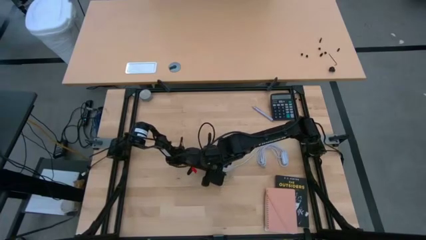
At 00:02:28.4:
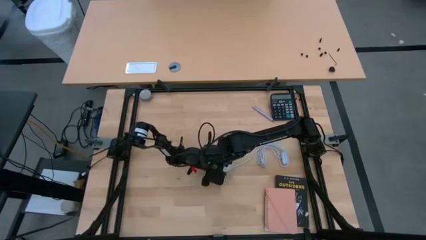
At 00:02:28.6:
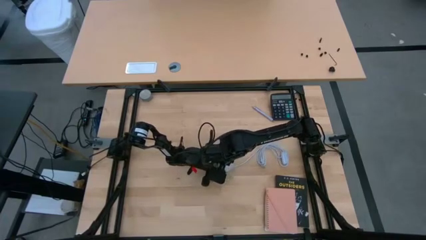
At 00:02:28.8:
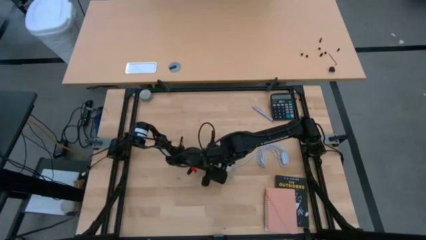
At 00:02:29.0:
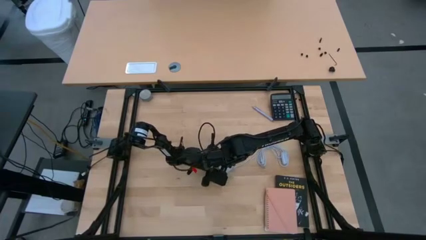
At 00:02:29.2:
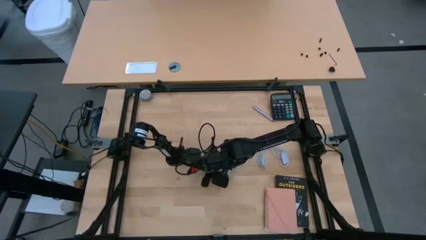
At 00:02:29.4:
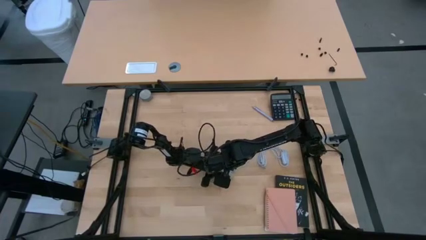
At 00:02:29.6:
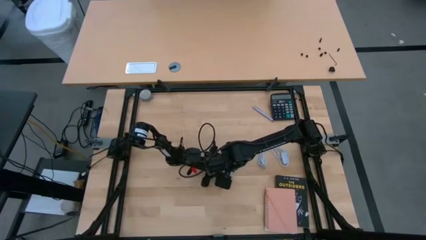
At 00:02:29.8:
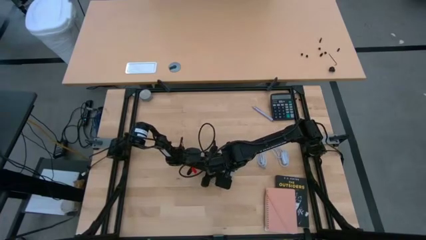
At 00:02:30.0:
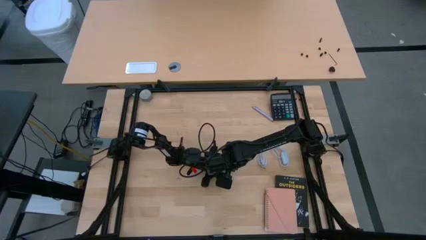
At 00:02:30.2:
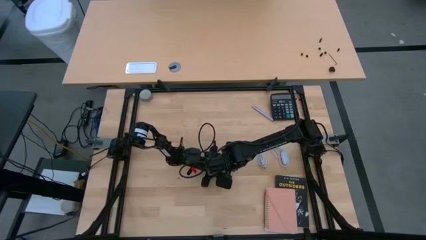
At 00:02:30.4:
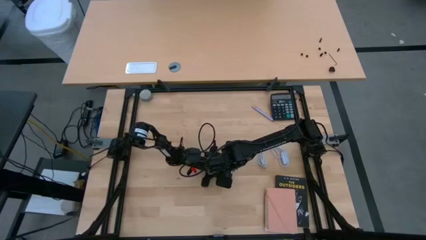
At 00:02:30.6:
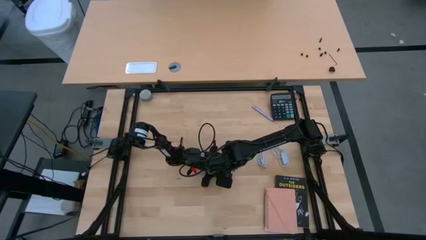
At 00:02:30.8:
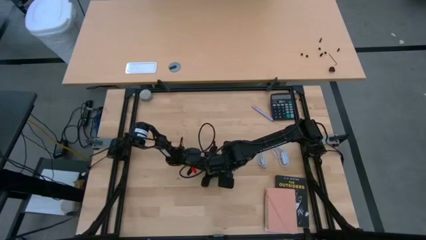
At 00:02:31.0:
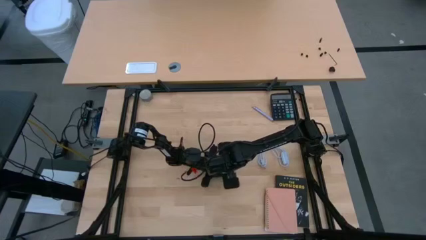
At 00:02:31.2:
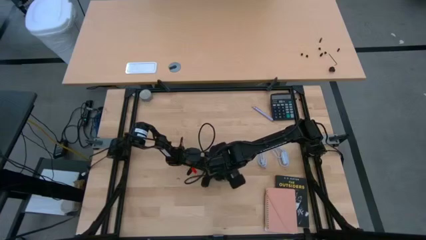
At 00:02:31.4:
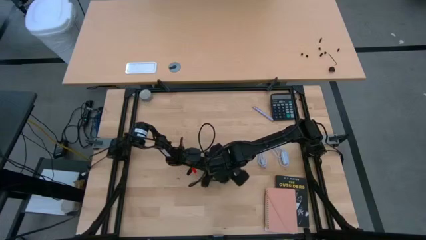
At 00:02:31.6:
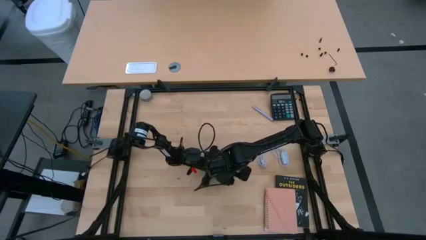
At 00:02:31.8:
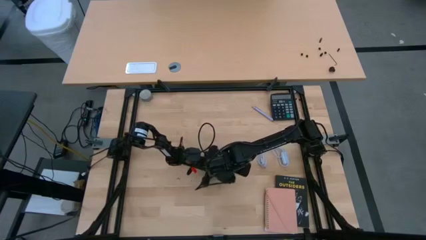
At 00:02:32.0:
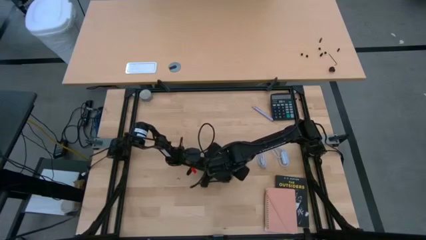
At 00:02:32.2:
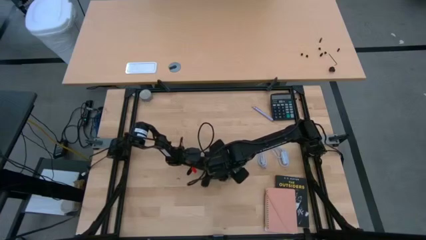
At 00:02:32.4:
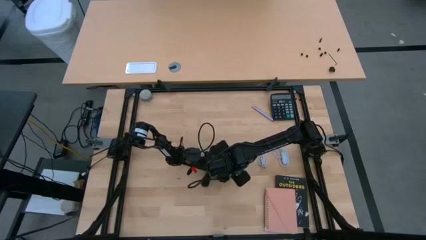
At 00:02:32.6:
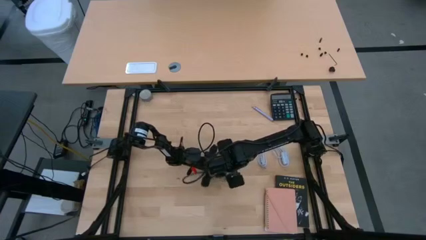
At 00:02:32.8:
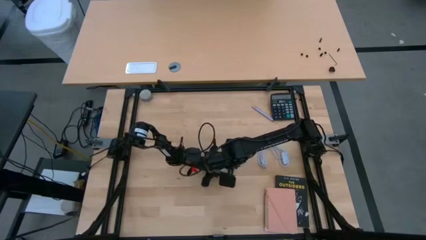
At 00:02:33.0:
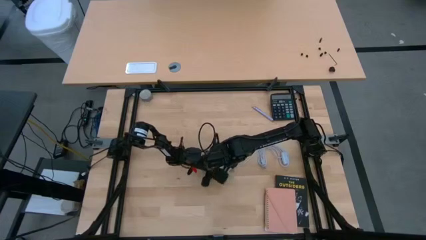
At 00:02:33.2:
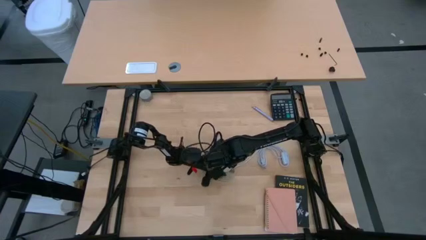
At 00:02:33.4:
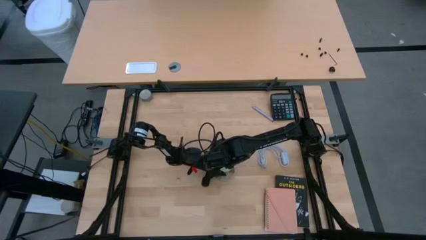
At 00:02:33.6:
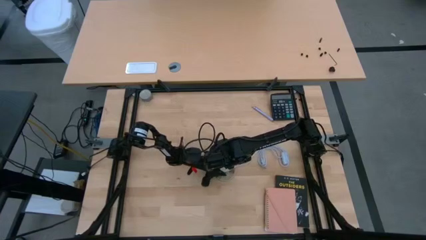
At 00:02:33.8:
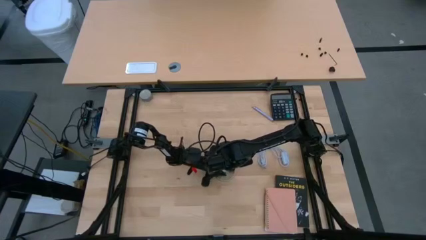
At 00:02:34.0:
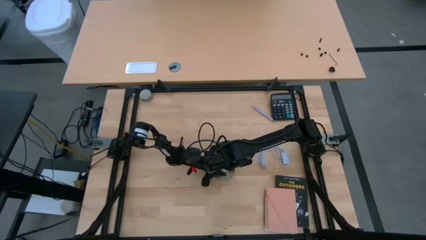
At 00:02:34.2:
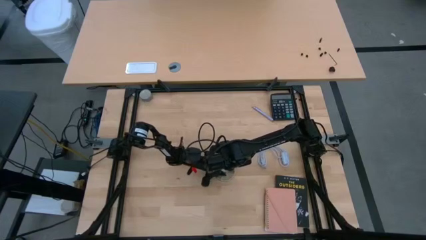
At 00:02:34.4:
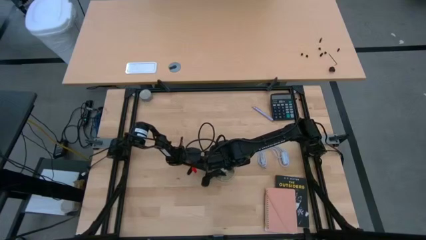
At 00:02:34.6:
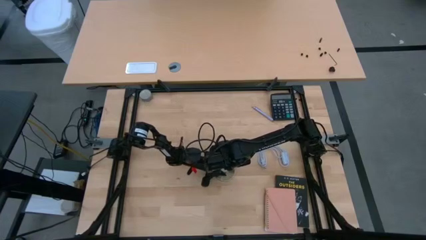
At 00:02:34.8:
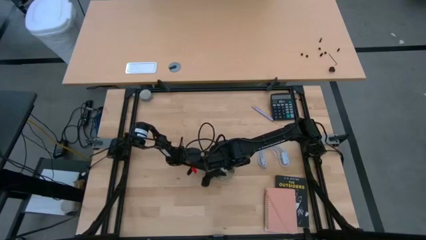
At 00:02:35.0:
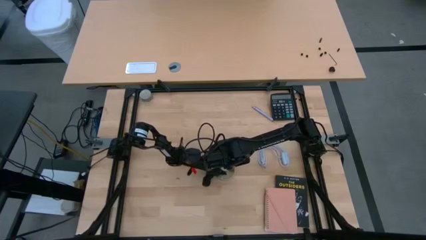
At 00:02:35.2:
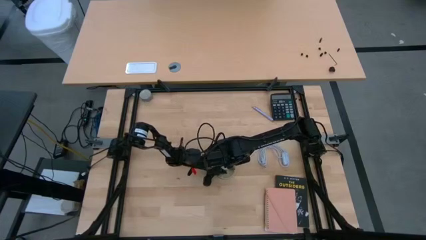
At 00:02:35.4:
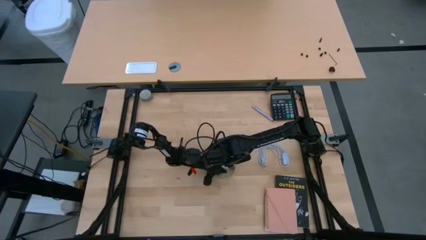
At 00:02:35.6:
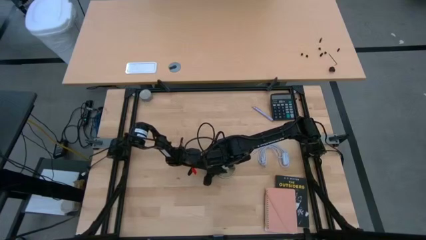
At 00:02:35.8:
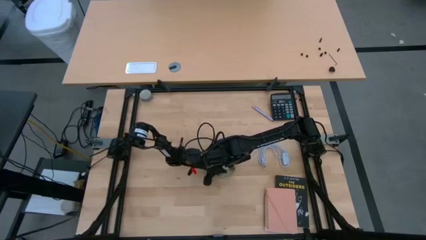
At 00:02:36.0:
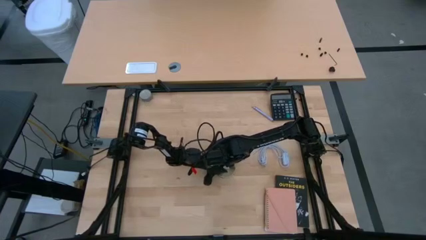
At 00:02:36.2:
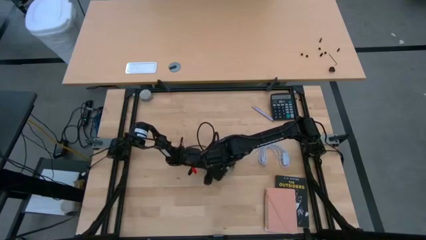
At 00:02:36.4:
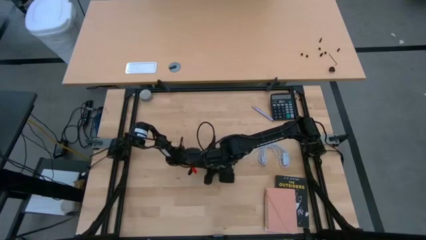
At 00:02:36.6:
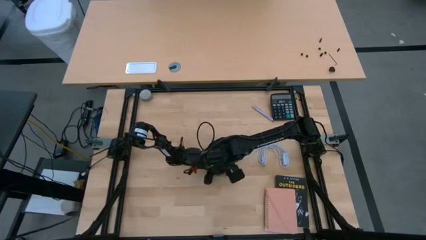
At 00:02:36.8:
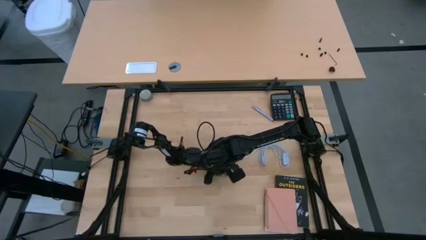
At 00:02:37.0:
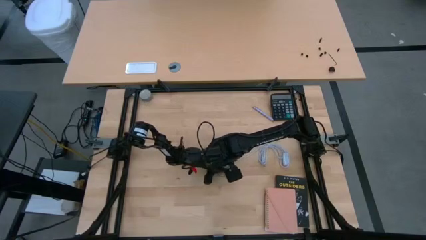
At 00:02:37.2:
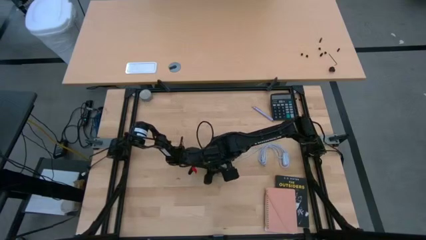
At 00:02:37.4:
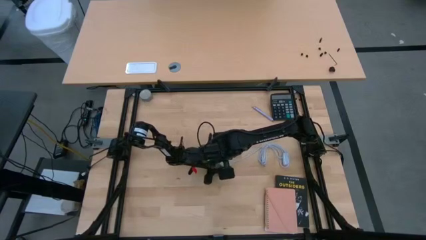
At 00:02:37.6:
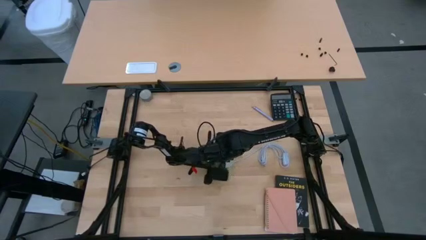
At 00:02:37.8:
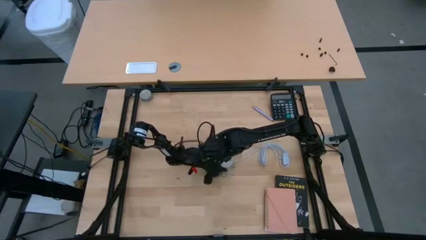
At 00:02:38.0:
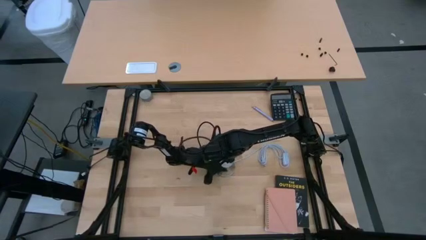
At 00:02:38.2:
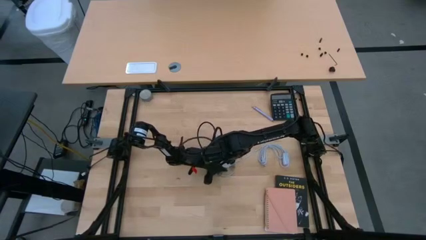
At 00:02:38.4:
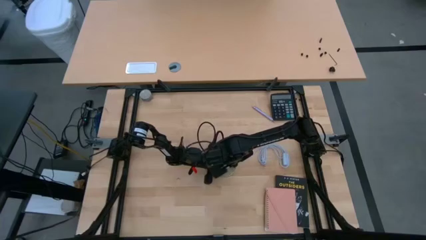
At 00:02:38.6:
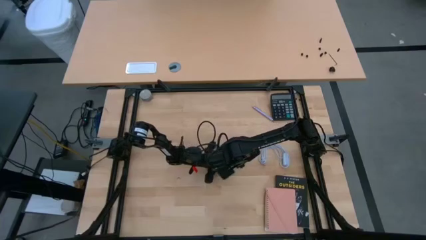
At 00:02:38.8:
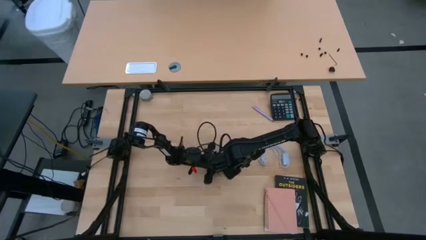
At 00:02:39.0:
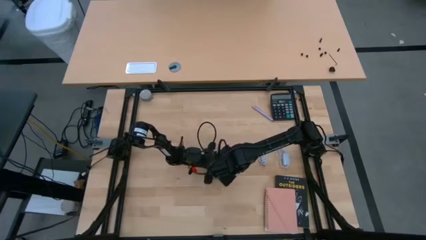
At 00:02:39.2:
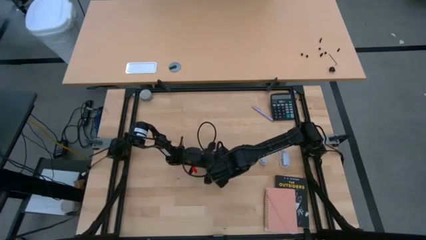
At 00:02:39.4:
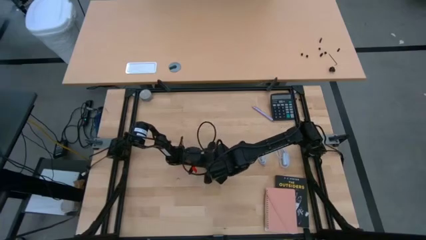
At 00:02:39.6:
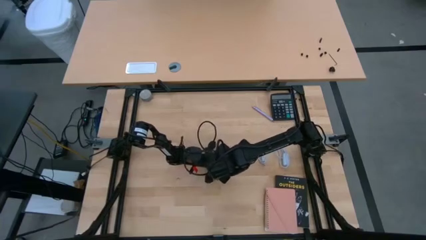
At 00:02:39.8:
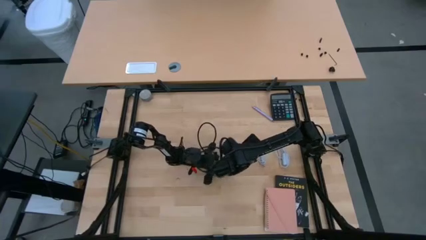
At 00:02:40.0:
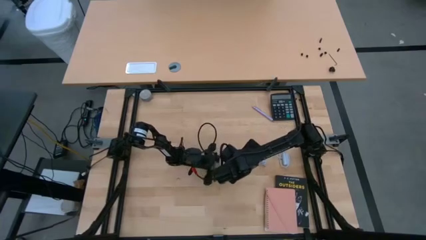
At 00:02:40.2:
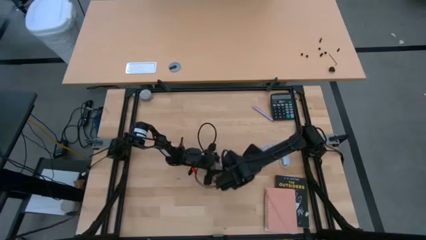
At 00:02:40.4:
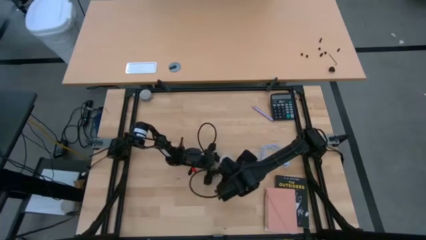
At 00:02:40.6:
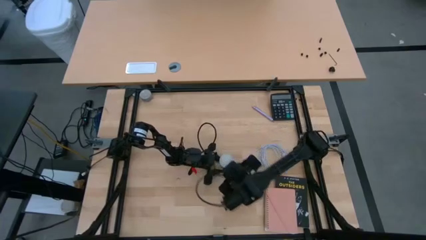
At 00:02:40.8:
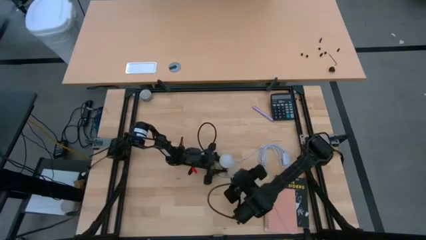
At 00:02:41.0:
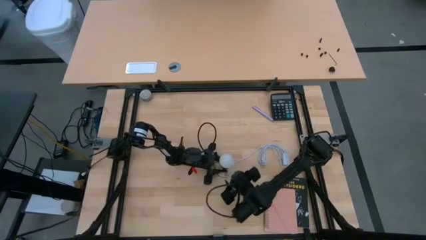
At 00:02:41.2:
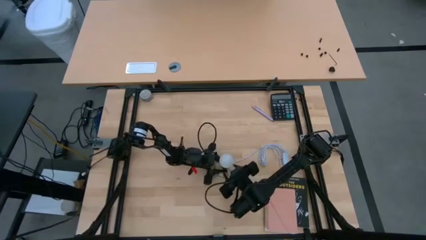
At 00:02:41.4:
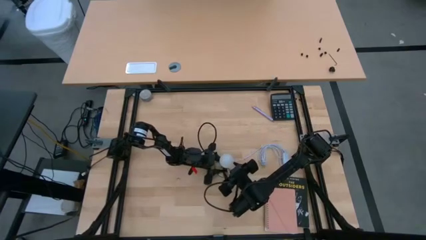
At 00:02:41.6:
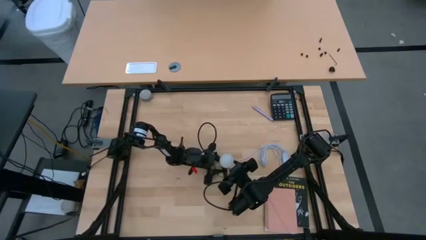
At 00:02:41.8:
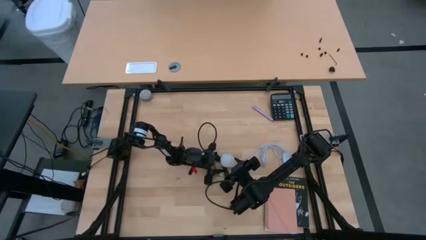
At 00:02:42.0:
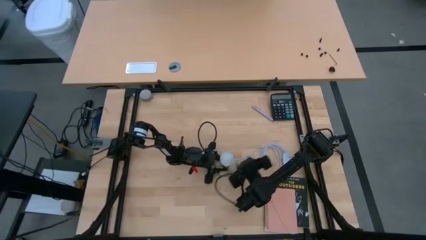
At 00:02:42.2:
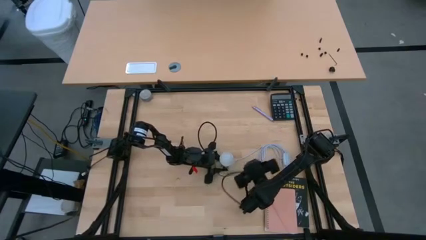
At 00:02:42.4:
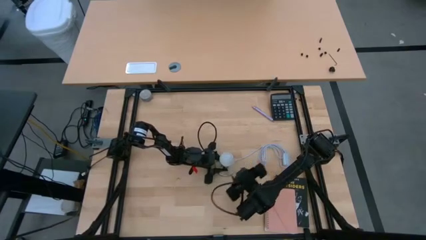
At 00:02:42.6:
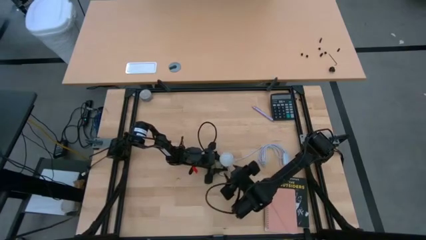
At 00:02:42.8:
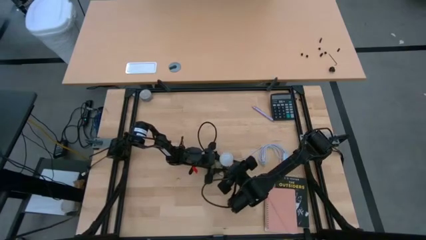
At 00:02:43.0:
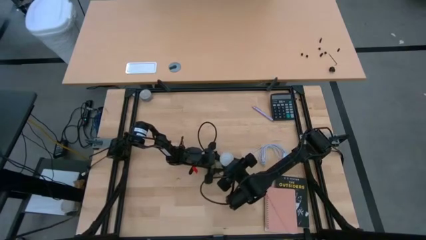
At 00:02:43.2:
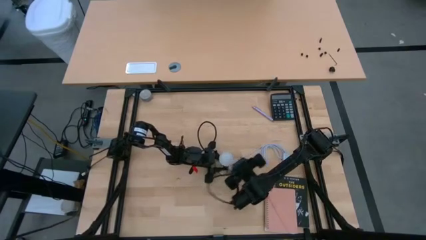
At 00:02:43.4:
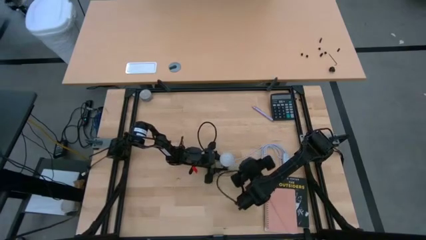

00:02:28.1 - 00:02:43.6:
Task: Screw lightbulb
Remove the light bulb from the lamp
